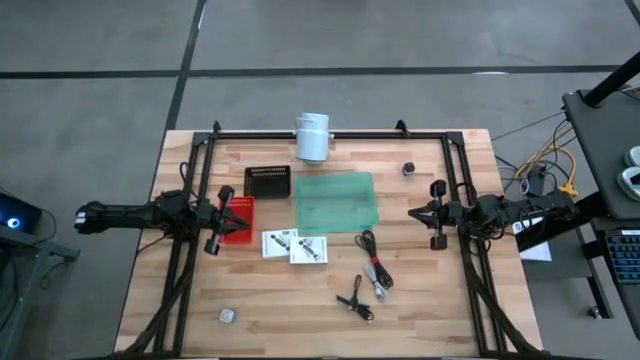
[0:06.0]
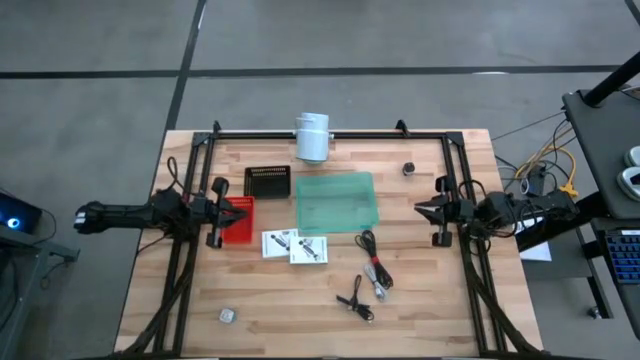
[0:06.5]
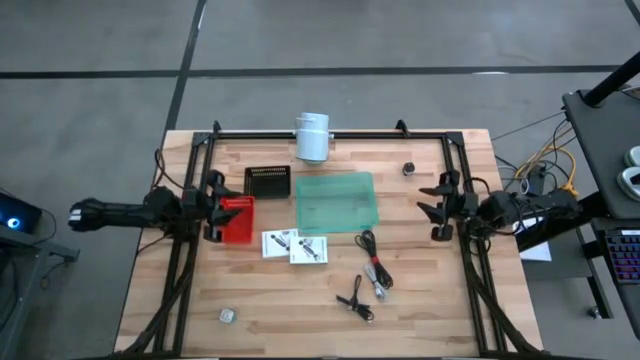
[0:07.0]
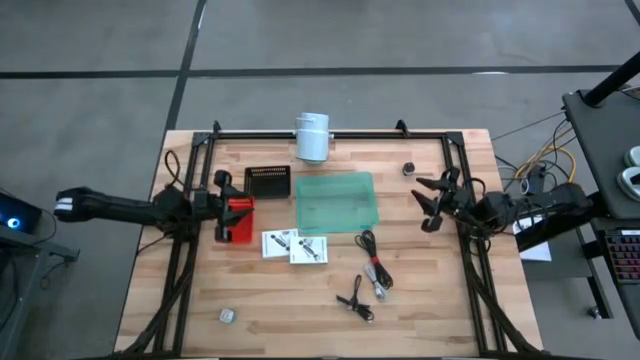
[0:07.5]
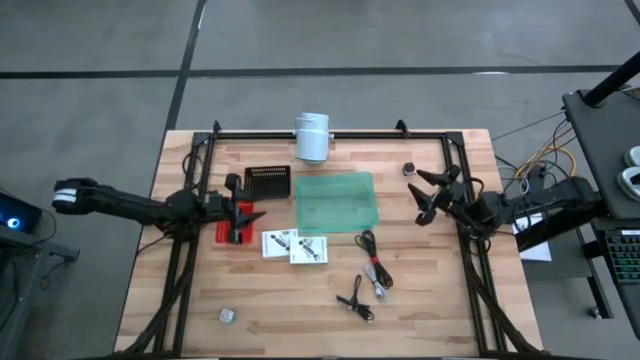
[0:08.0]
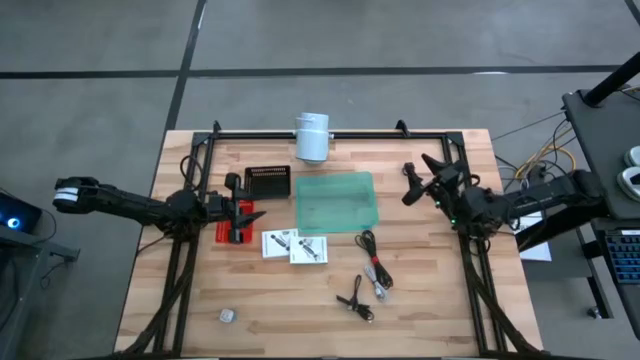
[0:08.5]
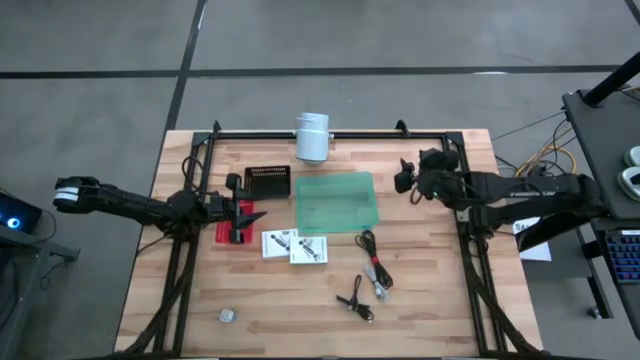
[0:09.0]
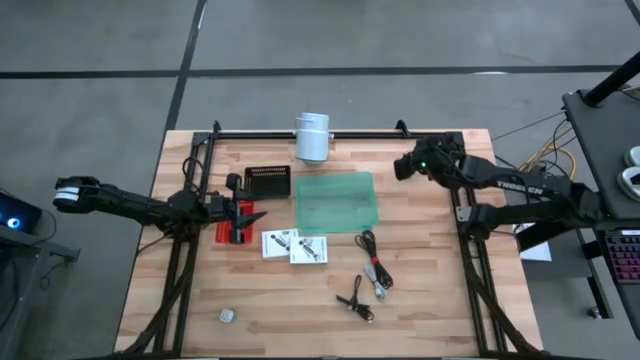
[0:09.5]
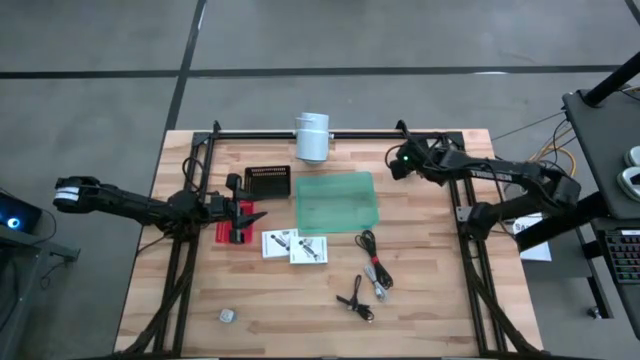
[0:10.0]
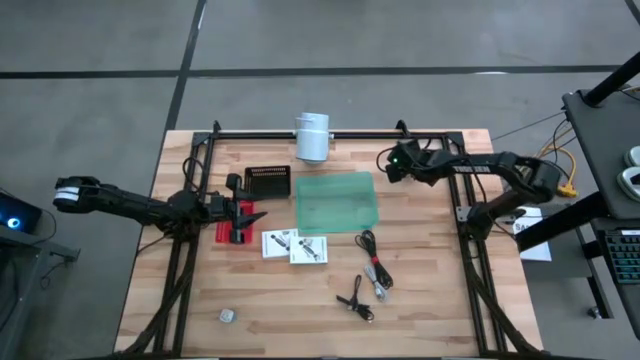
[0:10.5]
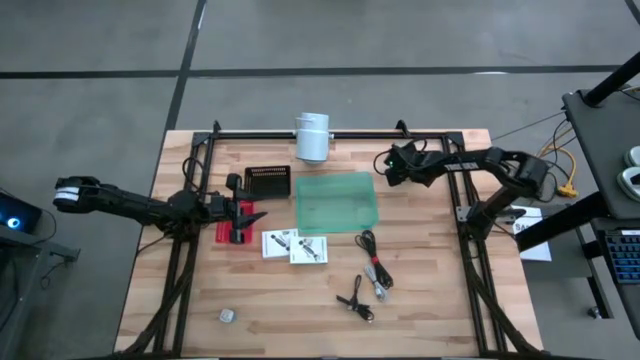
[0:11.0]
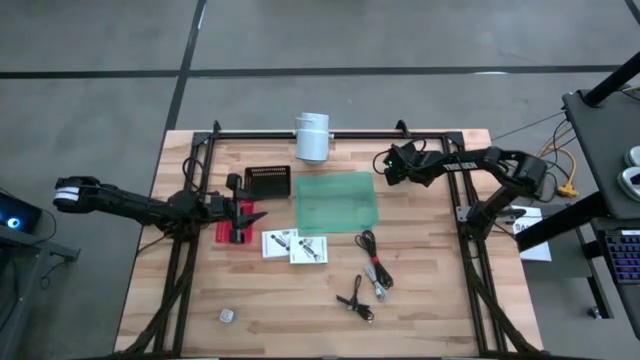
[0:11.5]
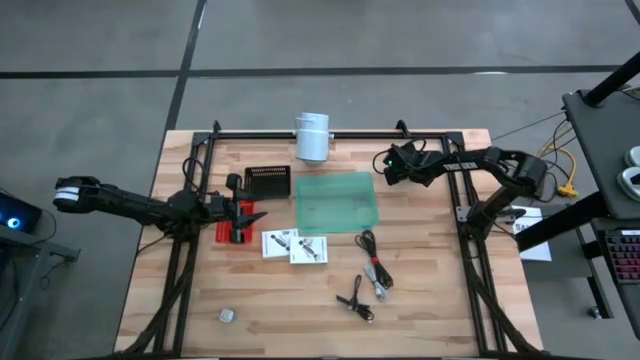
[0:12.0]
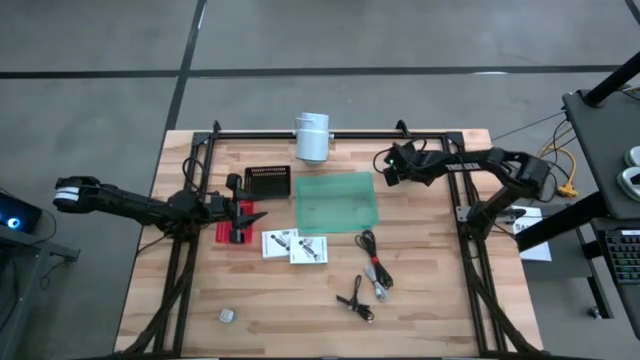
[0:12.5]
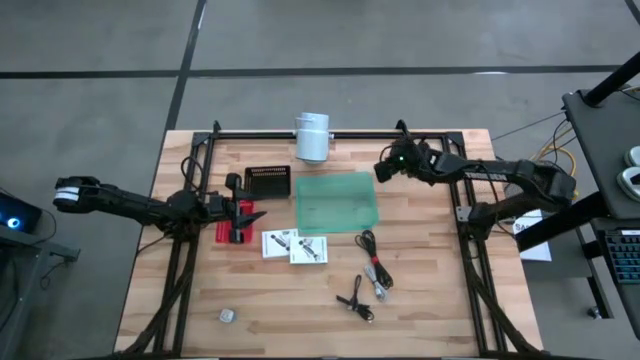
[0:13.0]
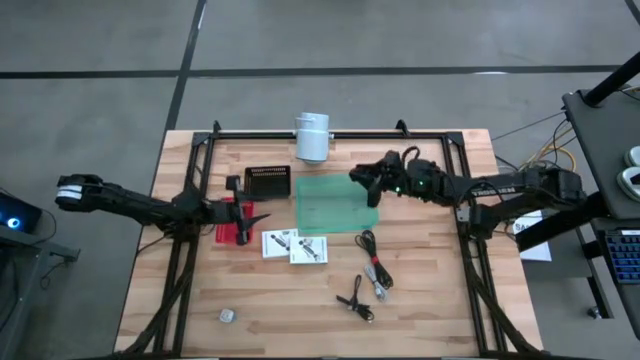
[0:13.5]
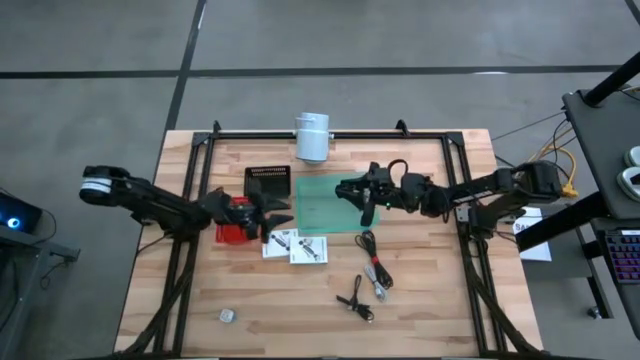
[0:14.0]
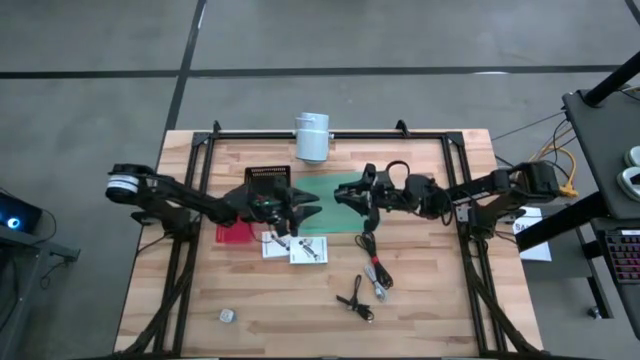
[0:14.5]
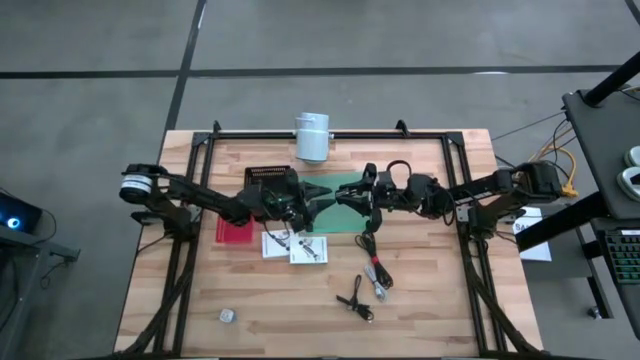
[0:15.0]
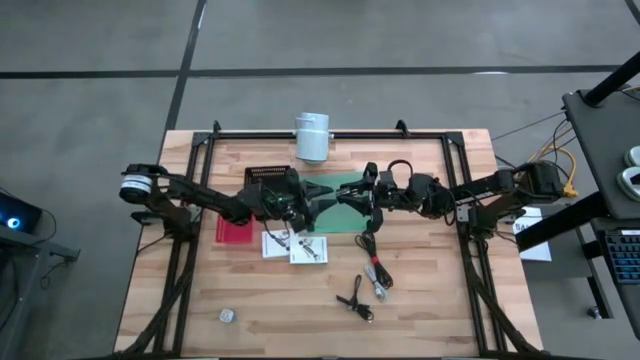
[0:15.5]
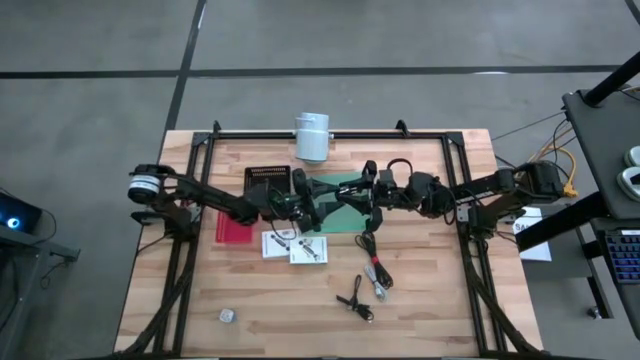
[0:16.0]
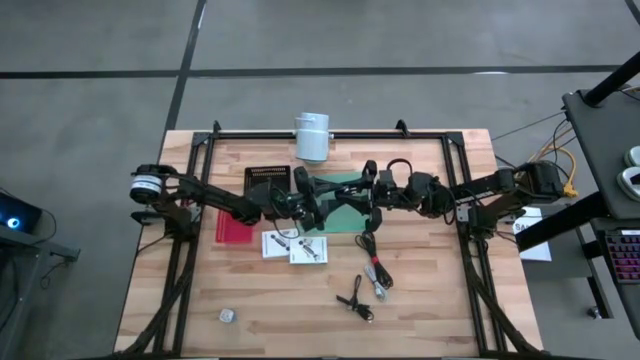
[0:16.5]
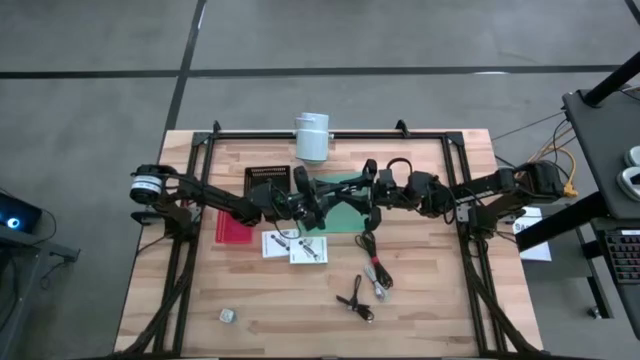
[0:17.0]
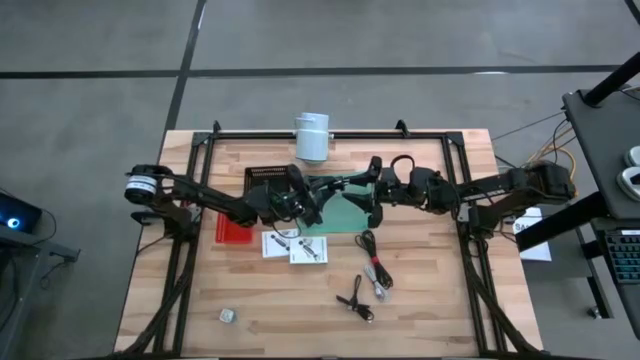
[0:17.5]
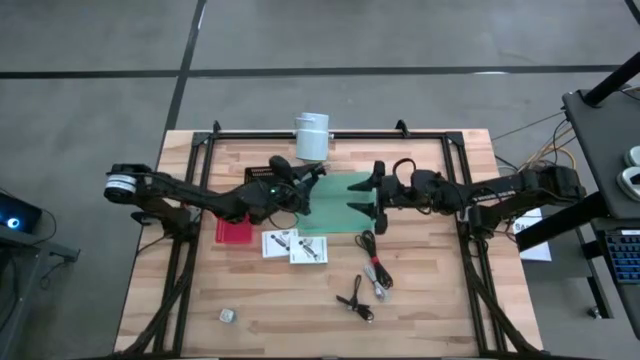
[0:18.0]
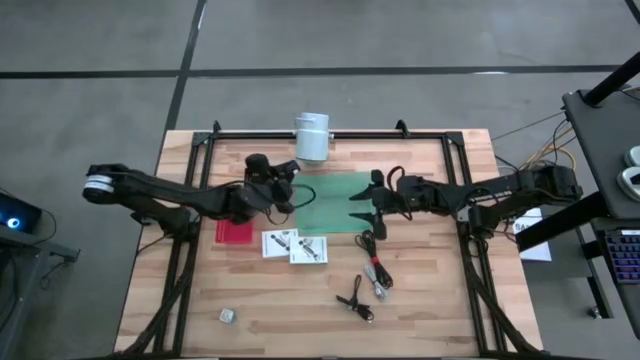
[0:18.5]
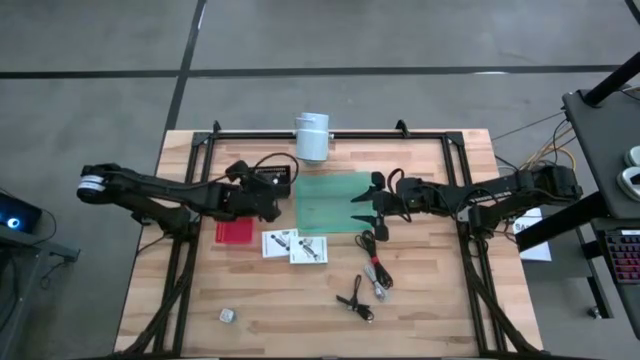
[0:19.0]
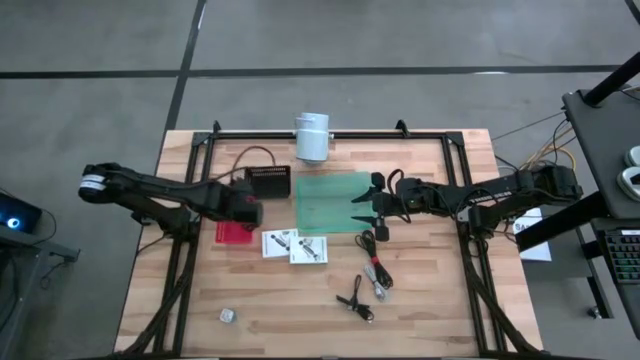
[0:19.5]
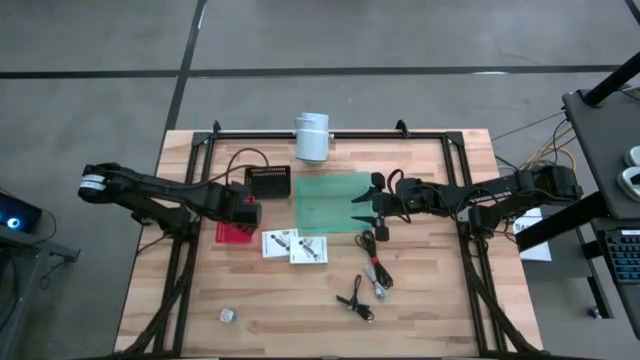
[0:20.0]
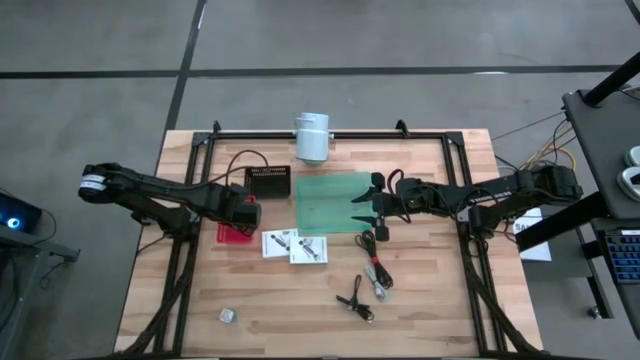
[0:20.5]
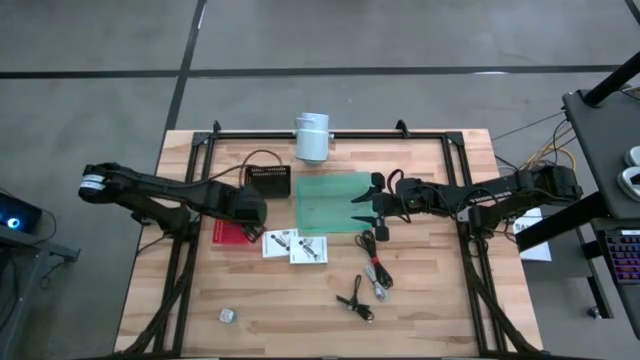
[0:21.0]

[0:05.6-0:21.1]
Task: Pick and place items into bin
Put the black adapter into the red bin

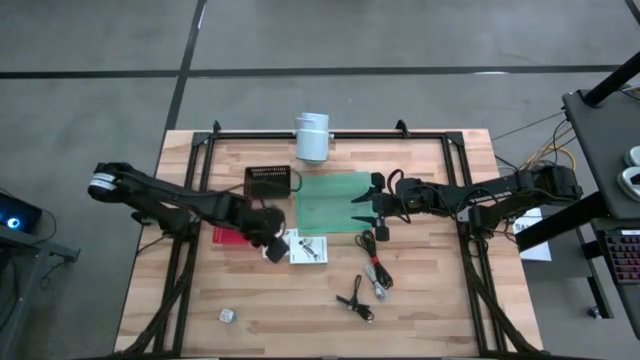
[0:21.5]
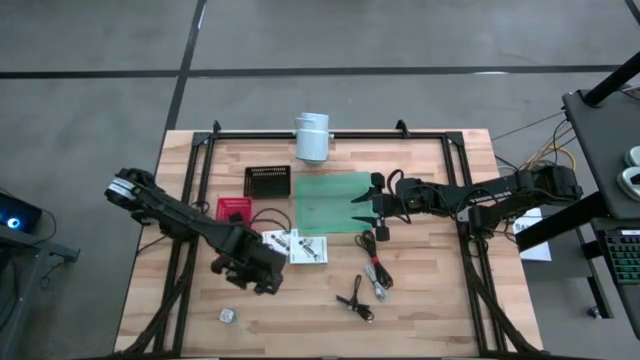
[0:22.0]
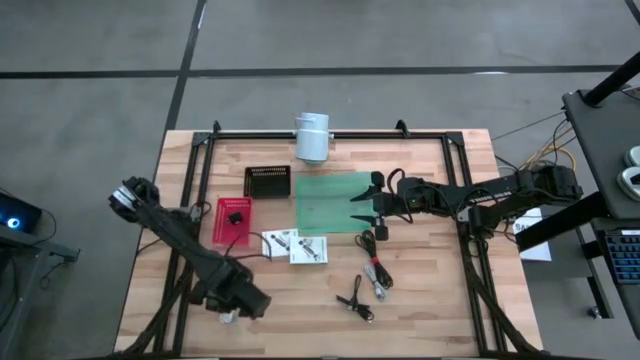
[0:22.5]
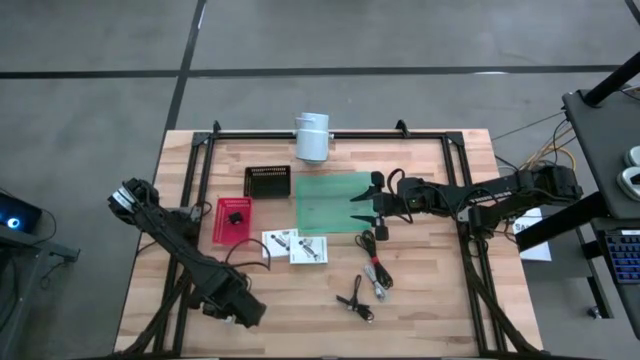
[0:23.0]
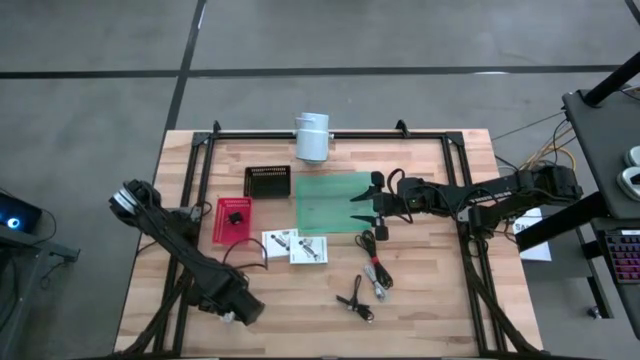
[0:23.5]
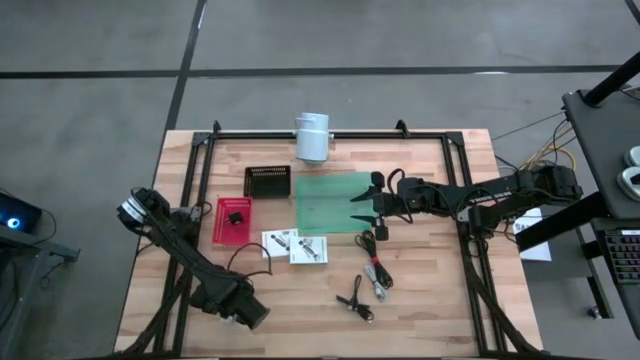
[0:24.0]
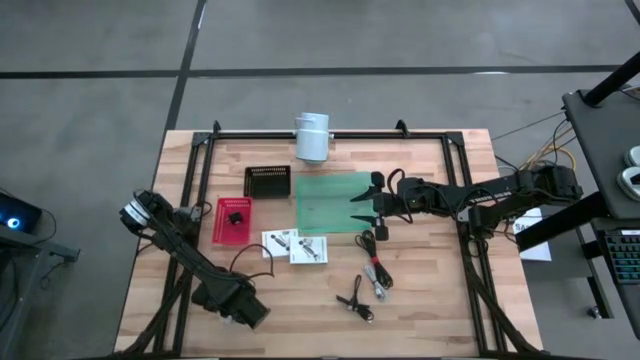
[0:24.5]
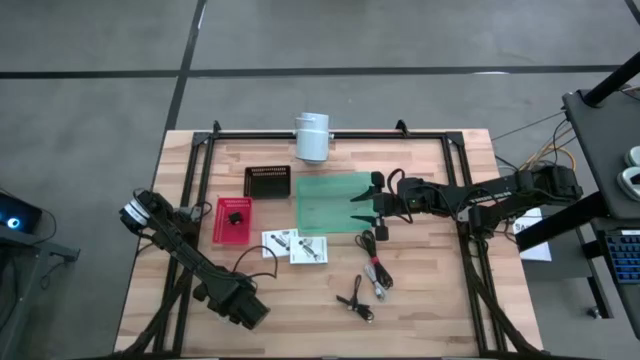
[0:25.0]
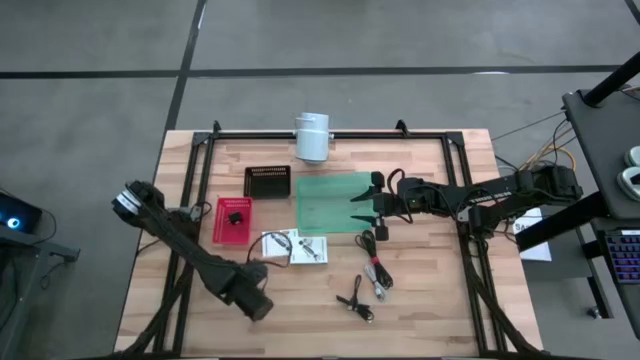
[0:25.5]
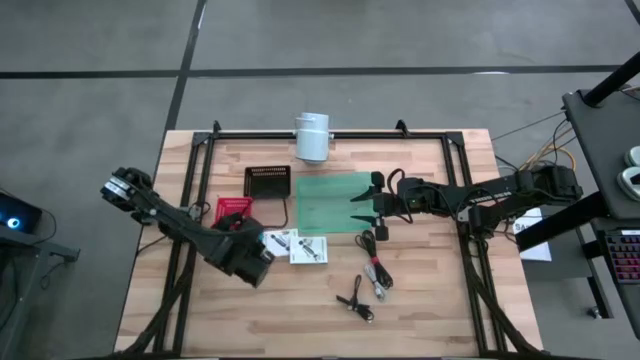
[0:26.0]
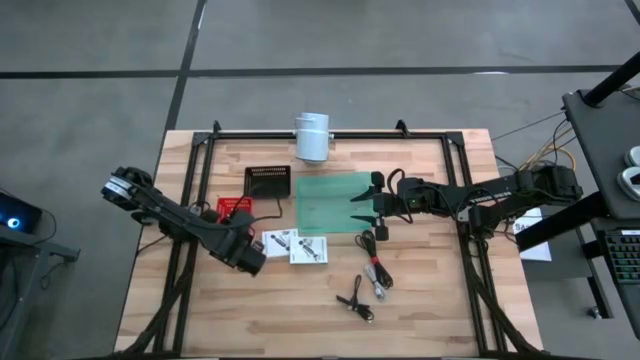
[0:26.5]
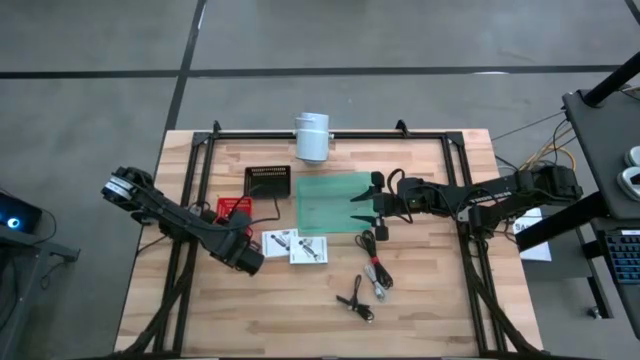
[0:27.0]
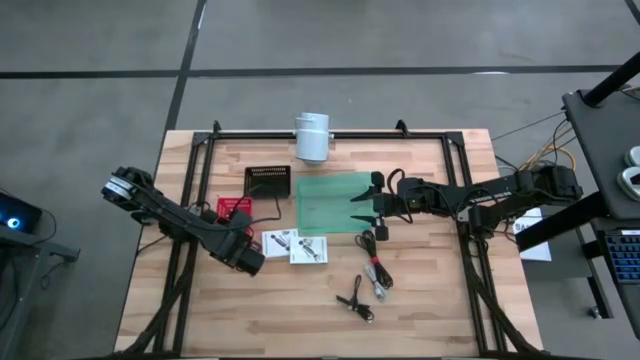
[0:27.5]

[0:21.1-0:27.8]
Put the blue adapter into the red bin
